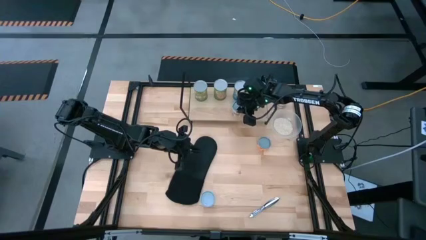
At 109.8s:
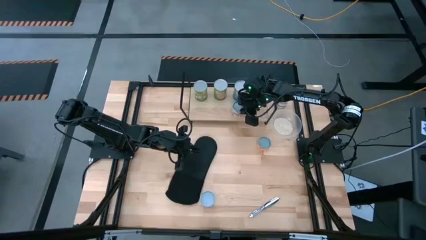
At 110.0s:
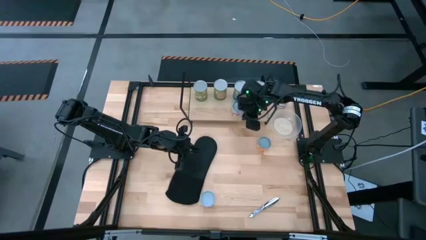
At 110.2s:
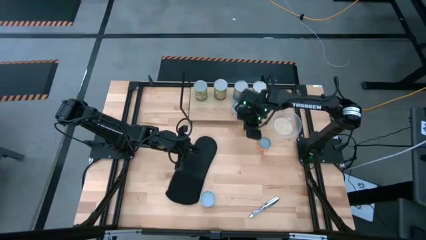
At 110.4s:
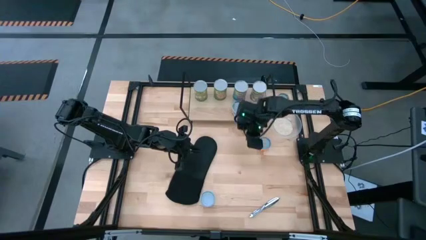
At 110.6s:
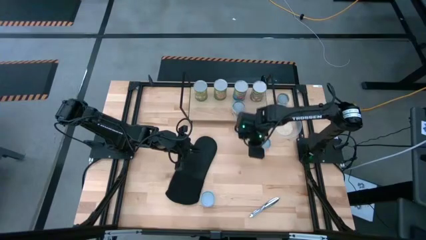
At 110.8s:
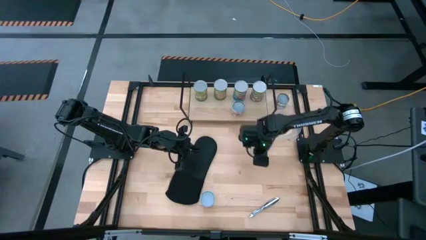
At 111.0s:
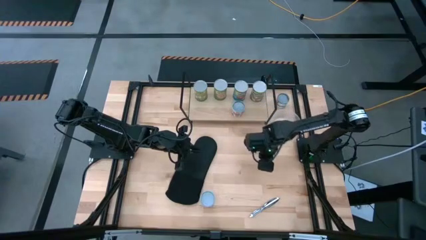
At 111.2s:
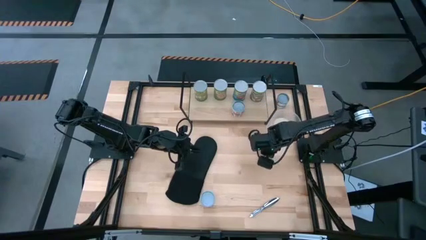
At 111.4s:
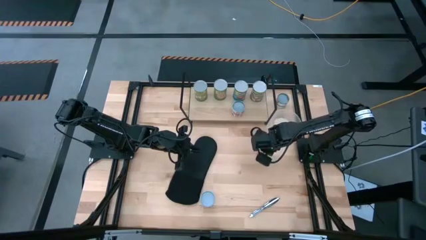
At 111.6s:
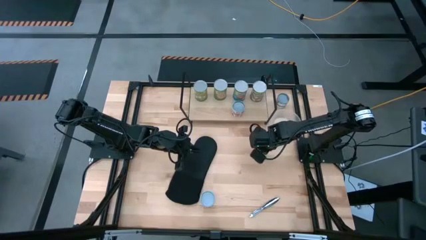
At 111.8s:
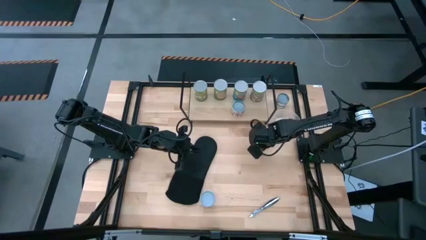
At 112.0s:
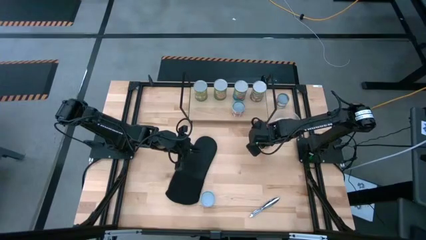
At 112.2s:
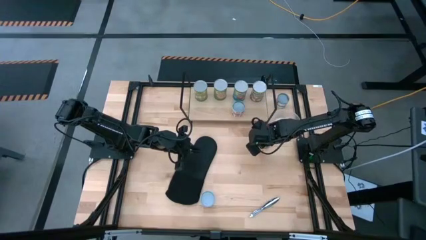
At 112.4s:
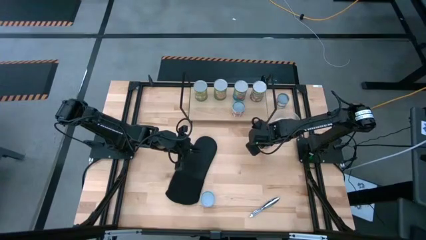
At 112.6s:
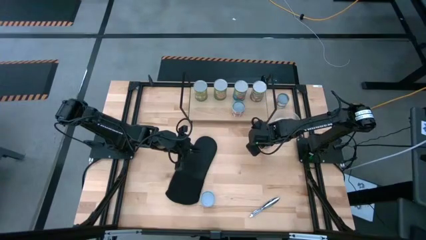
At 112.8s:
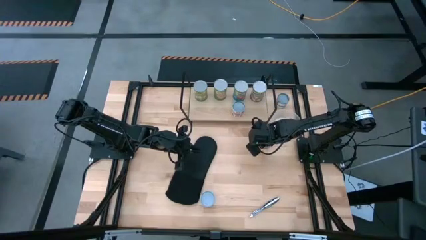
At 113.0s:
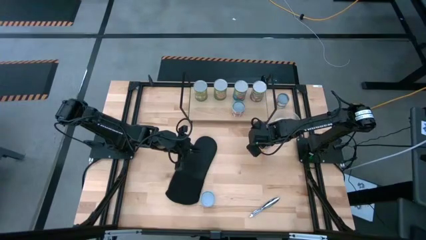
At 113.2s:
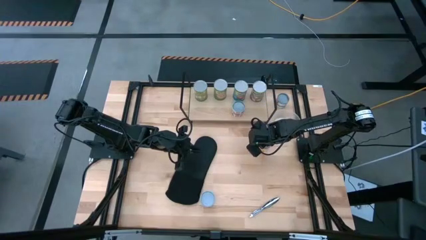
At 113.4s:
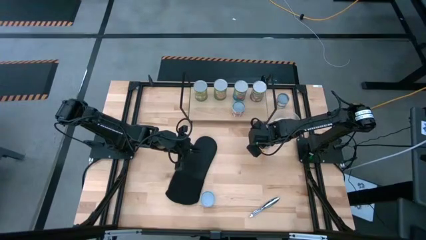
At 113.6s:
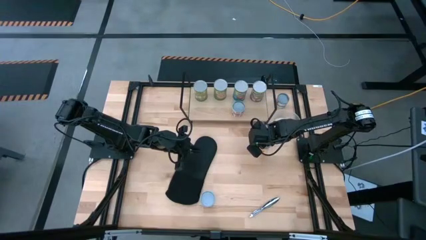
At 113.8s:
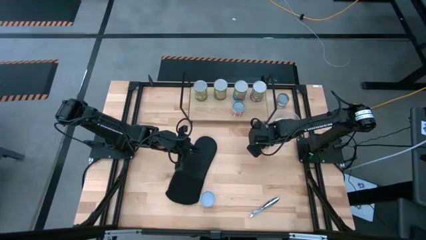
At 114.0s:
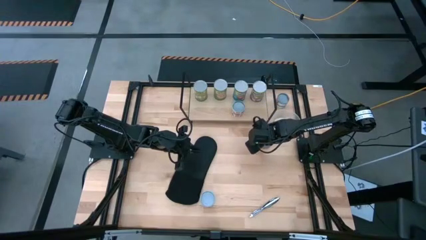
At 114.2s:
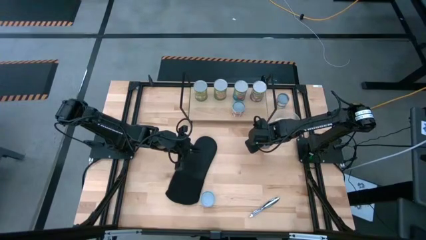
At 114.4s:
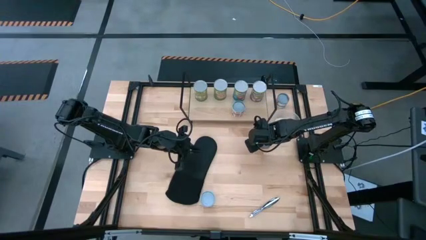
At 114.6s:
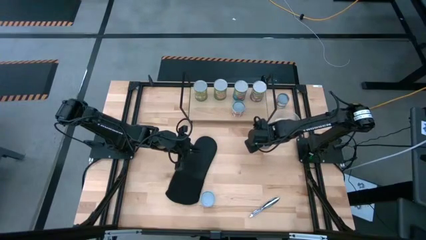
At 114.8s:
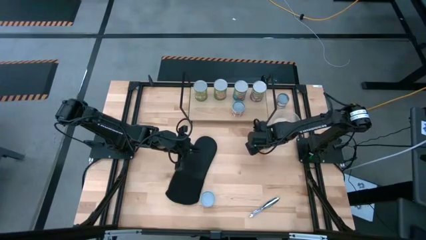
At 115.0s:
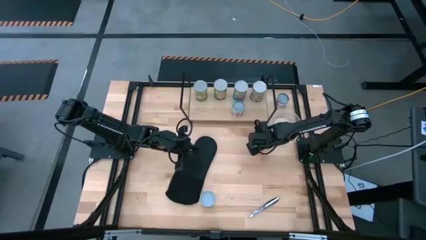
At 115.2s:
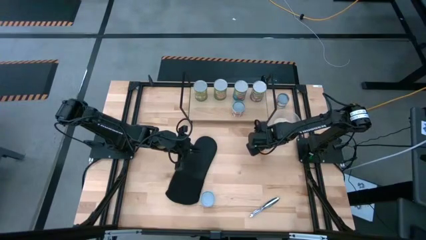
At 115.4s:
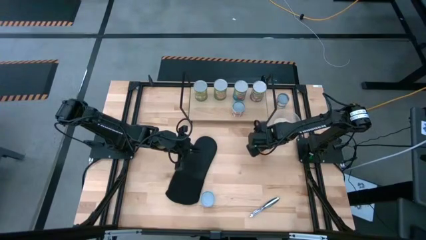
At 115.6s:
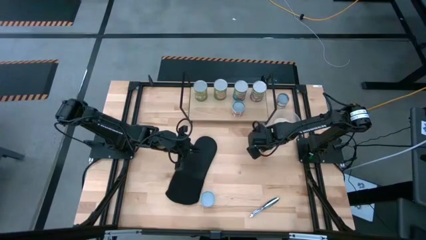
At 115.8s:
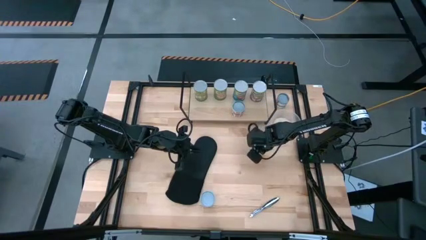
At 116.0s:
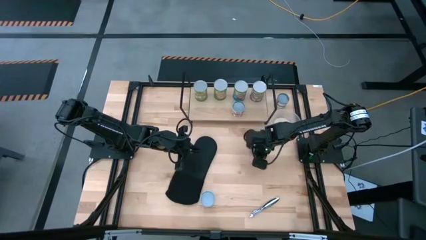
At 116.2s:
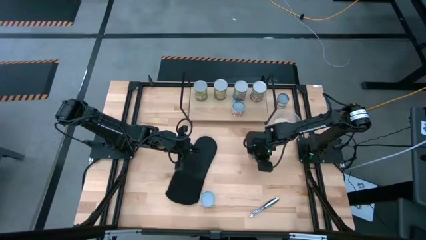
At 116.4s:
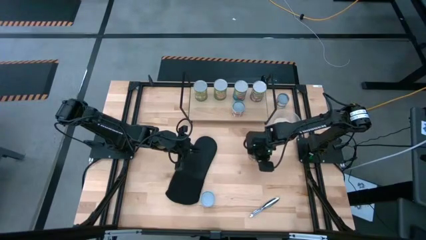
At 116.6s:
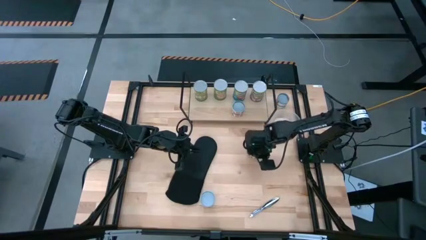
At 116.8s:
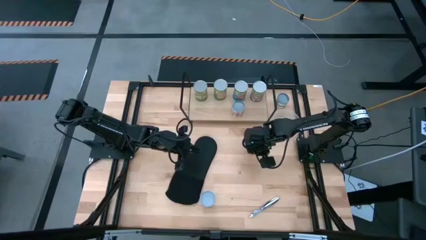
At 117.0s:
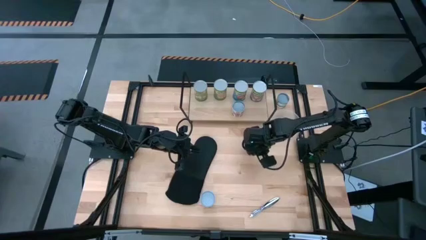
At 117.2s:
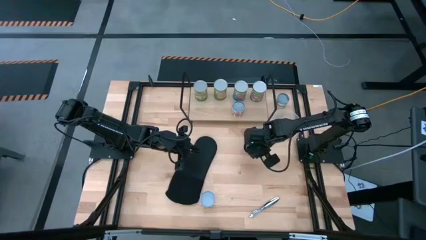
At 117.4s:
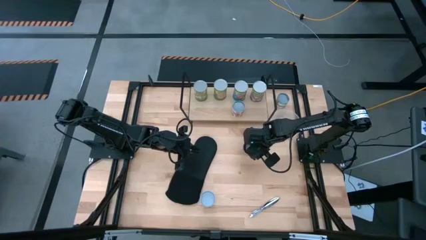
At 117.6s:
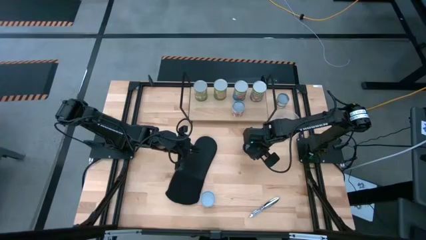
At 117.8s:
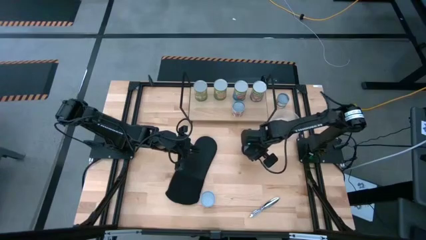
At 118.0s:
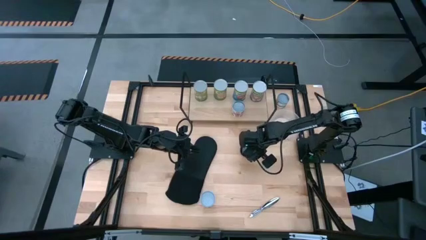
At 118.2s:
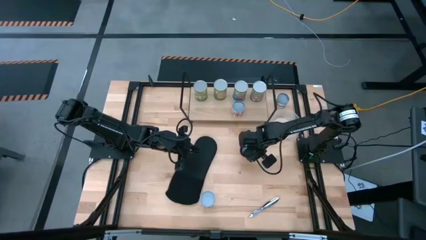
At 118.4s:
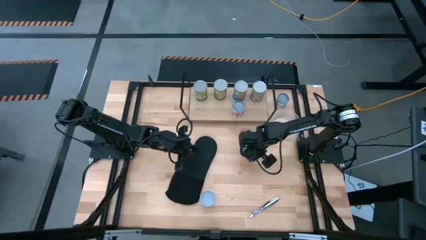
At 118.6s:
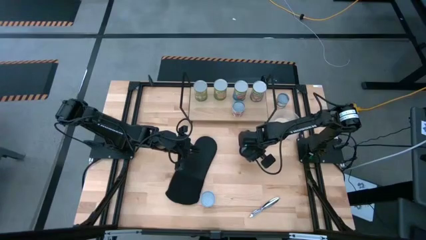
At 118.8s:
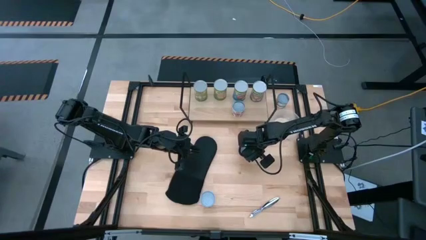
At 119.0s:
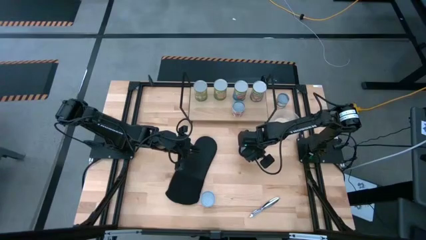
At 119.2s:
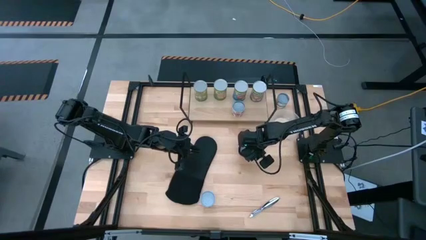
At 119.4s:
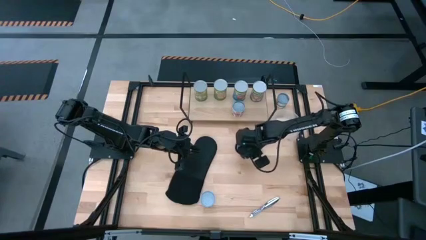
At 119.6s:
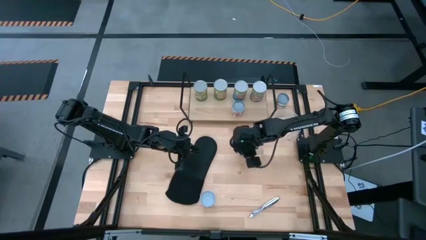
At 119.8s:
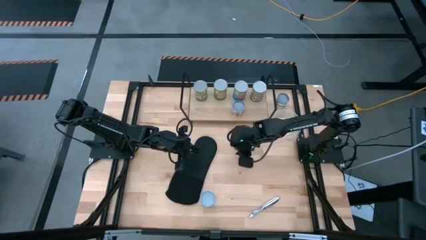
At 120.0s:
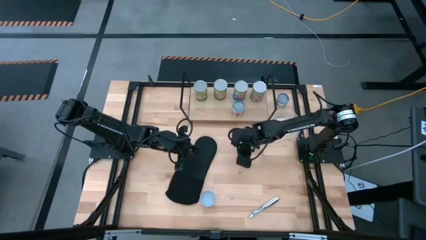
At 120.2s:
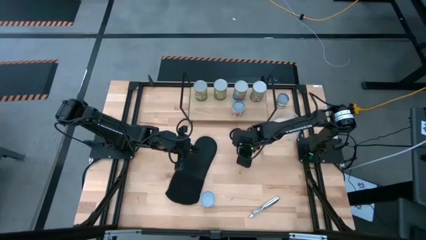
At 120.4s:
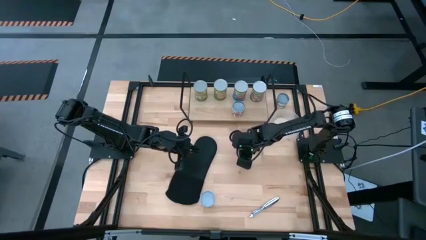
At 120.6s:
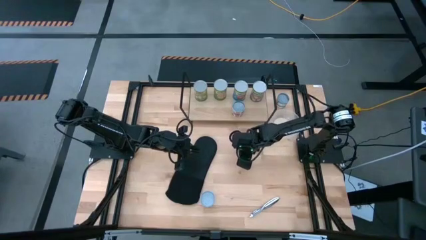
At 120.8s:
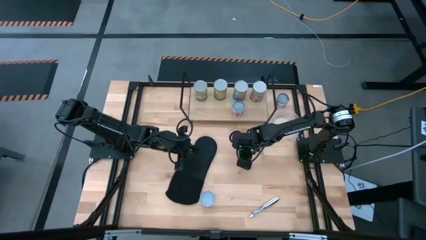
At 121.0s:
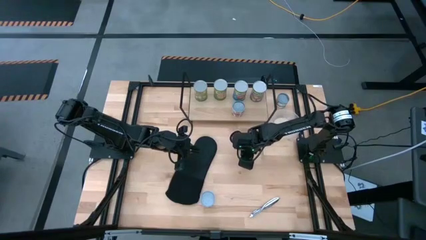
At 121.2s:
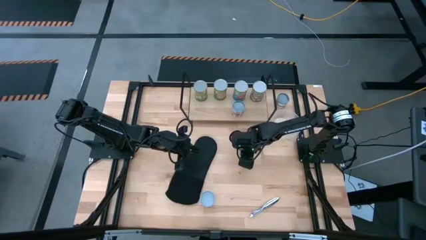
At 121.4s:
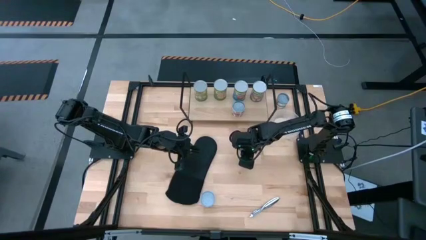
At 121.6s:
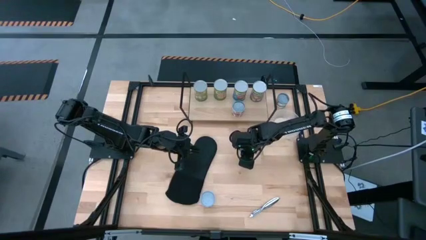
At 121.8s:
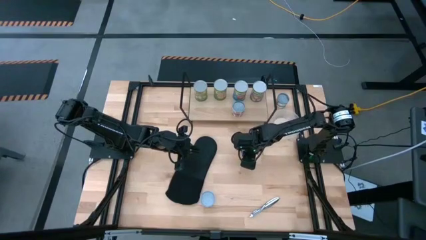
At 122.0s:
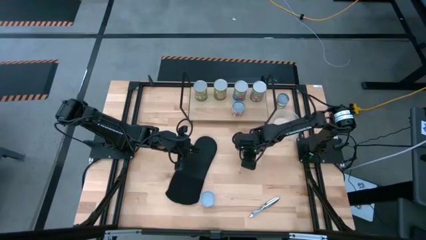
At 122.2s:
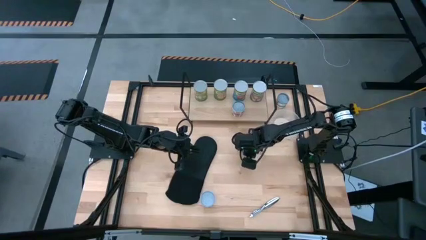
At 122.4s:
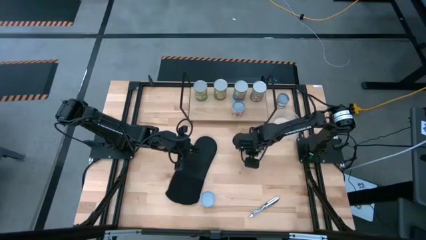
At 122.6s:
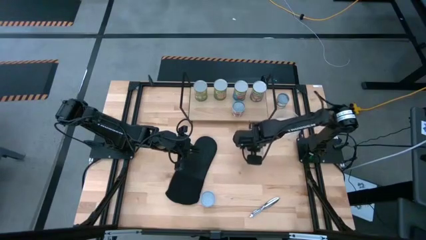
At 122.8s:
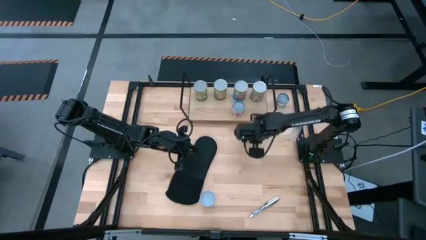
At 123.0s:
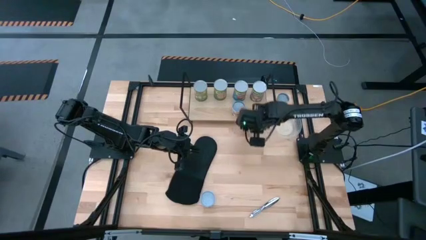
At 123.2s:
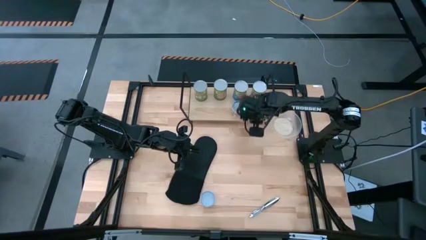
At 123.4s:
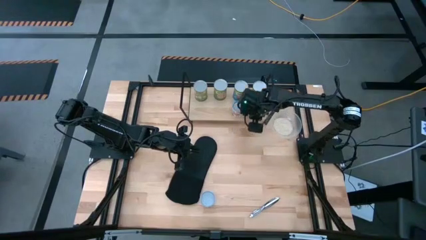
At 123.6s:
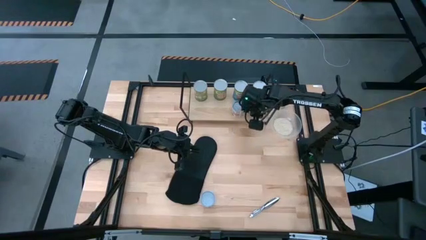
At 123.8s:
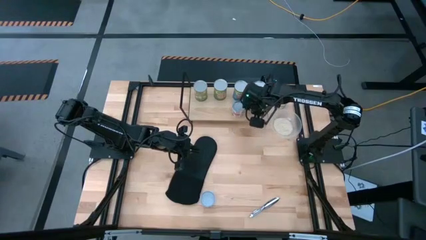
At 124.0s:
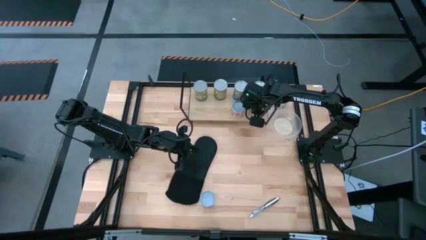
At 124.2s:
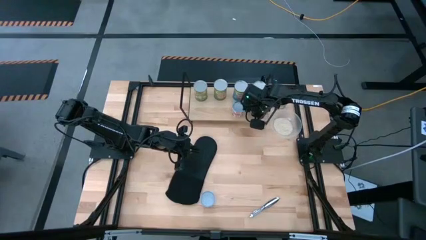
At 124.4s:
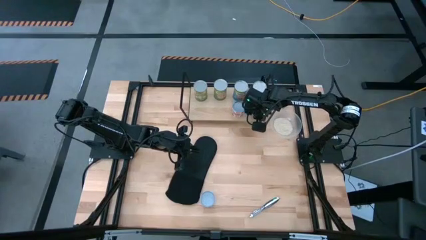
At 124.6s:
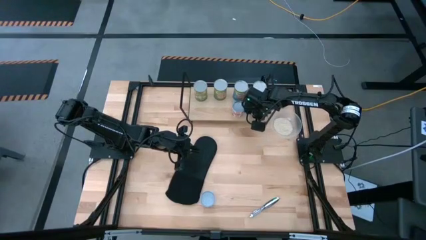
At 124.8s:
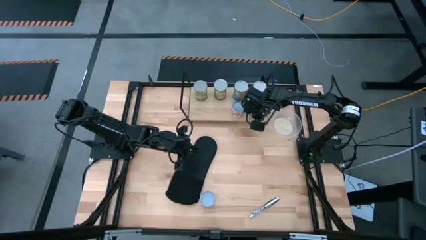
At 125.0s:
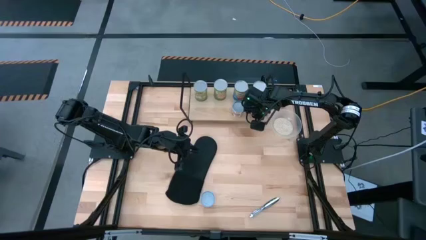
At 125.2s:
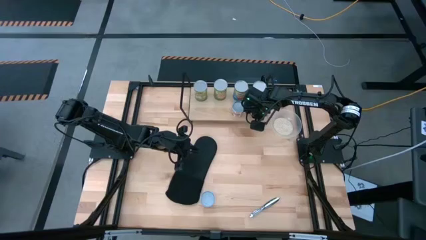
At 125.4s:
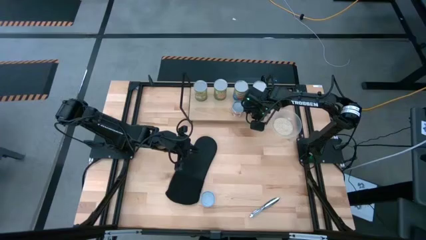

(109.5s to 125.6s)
Task: Pick and place cans onto a shelf
Put the canned pineapple on the shelf
